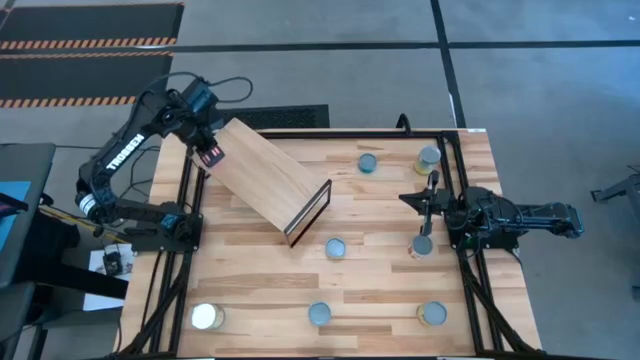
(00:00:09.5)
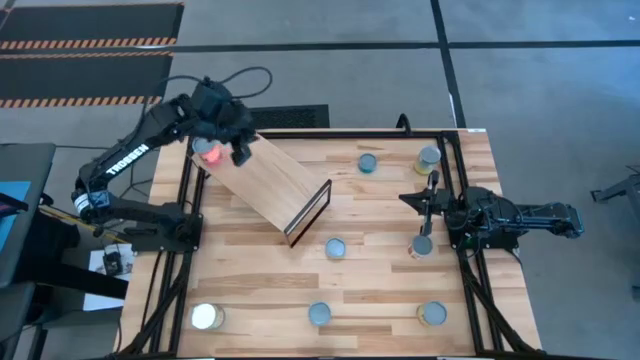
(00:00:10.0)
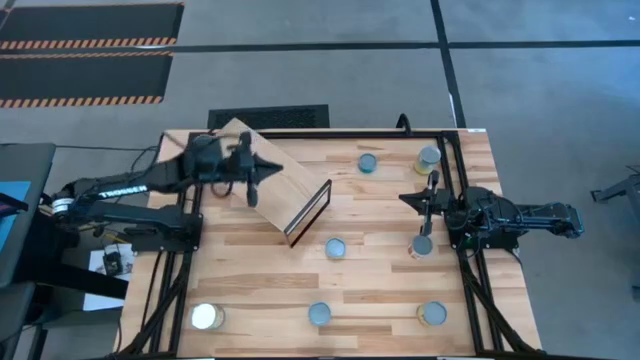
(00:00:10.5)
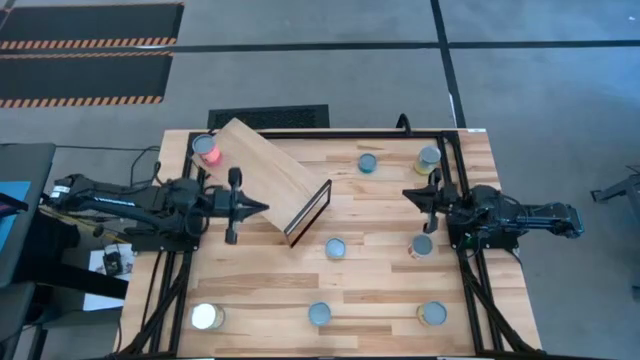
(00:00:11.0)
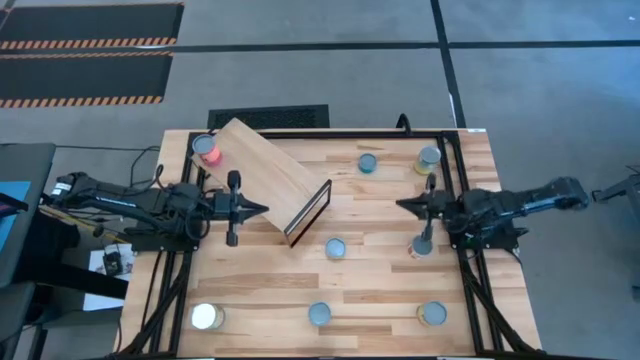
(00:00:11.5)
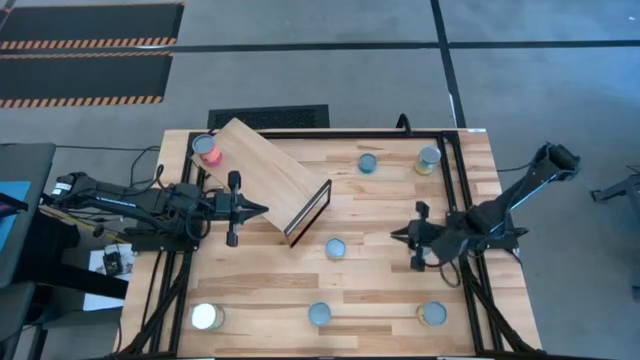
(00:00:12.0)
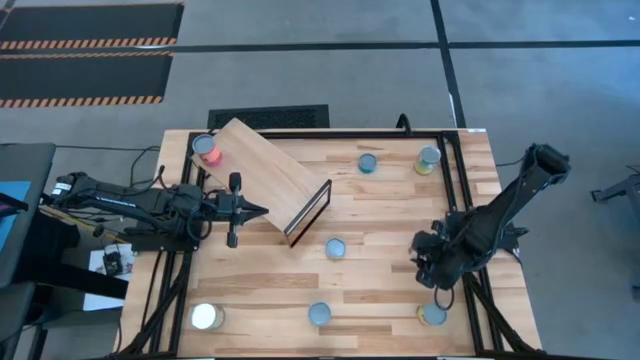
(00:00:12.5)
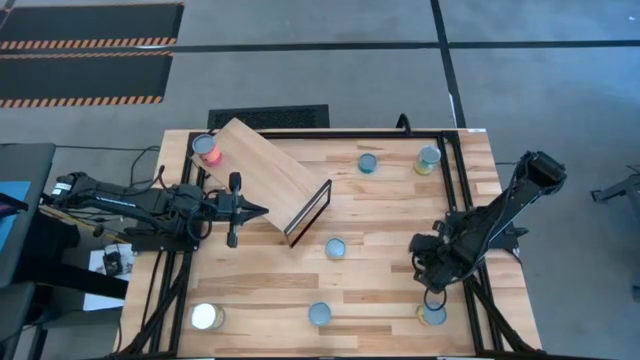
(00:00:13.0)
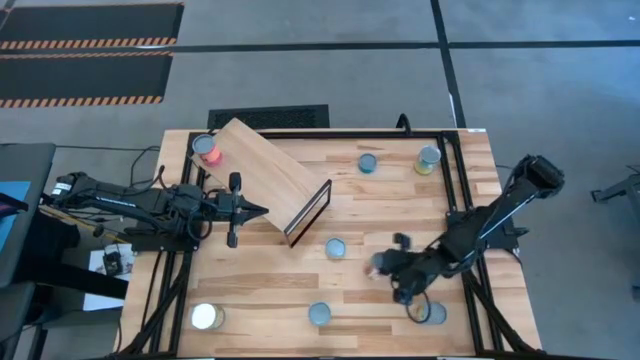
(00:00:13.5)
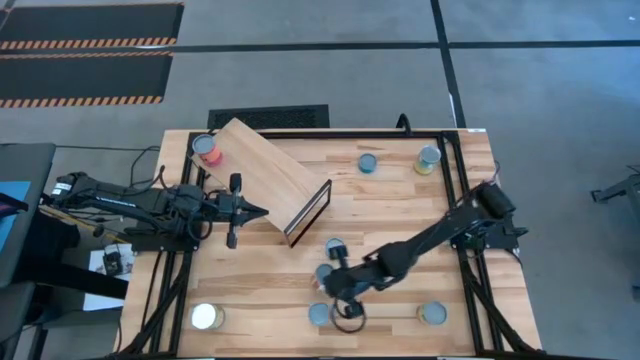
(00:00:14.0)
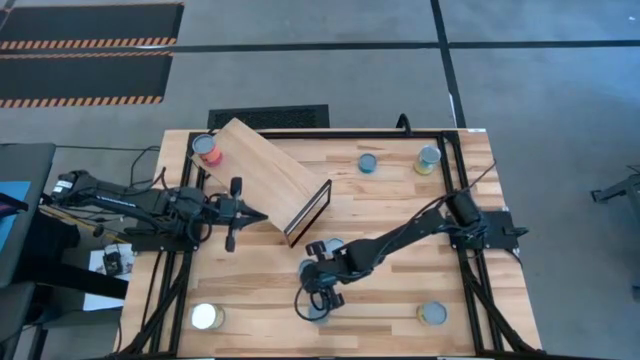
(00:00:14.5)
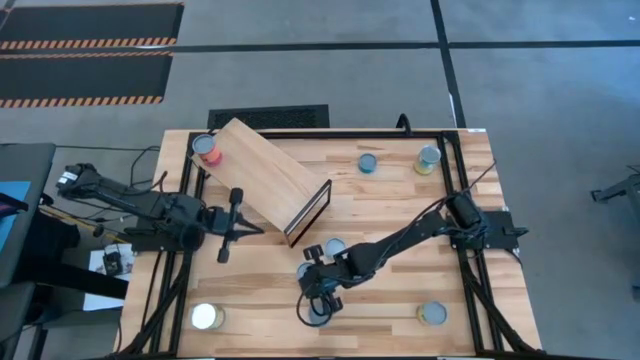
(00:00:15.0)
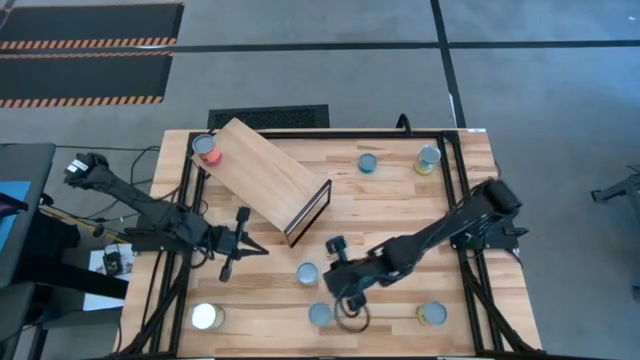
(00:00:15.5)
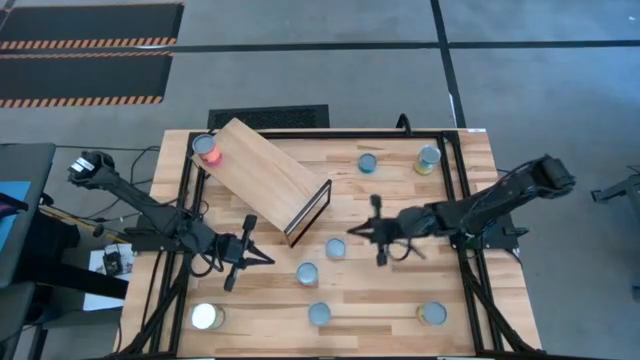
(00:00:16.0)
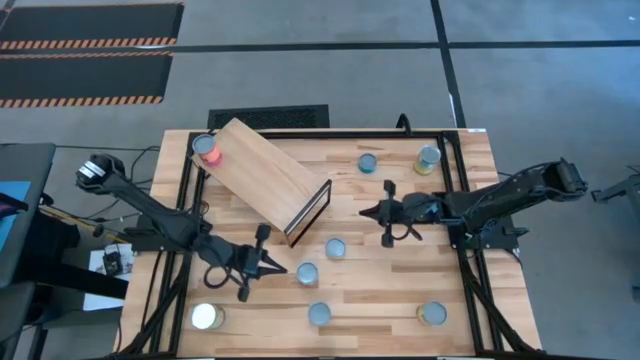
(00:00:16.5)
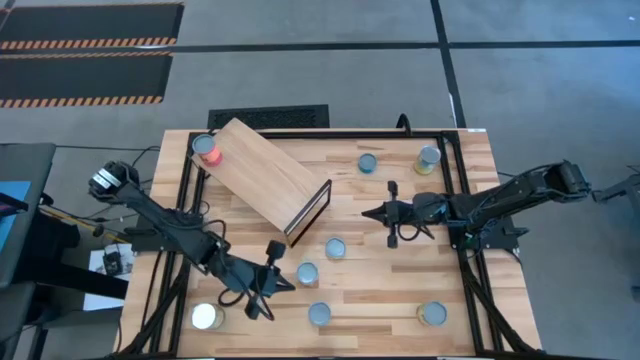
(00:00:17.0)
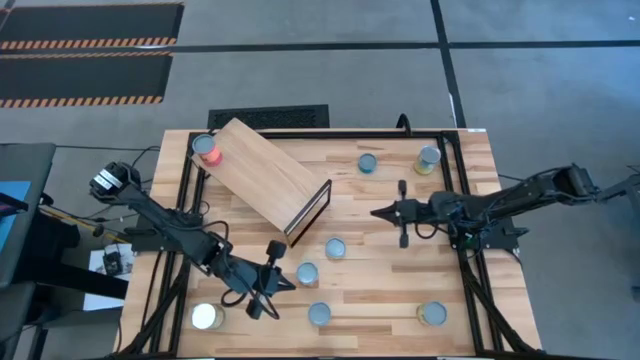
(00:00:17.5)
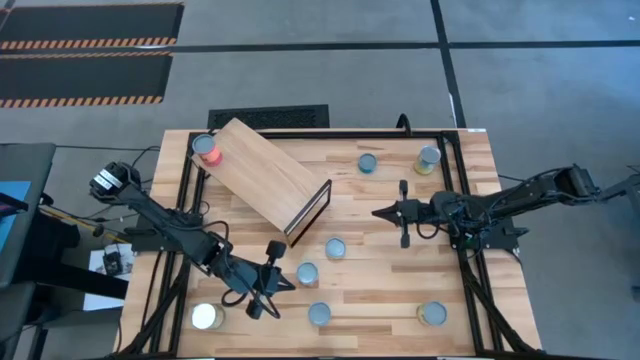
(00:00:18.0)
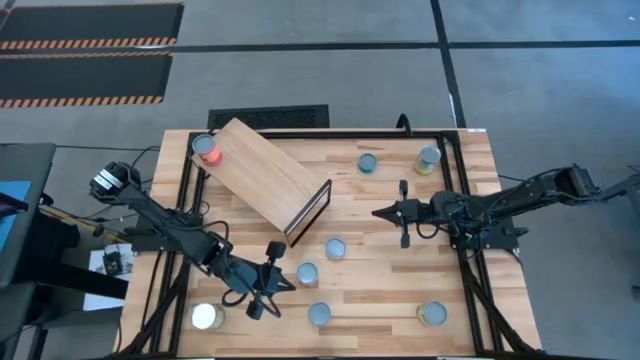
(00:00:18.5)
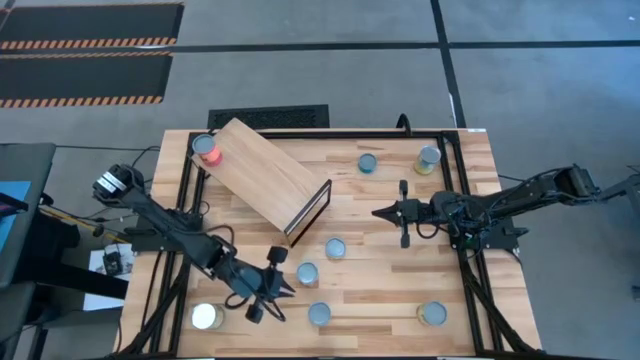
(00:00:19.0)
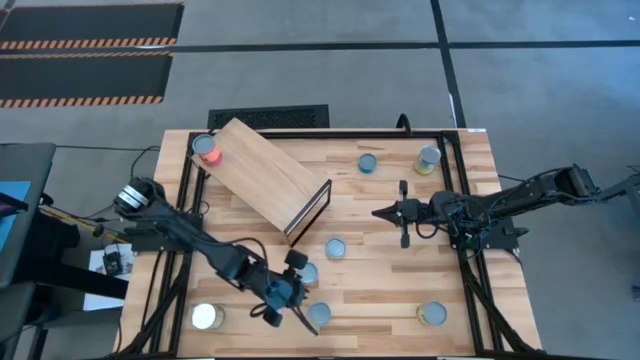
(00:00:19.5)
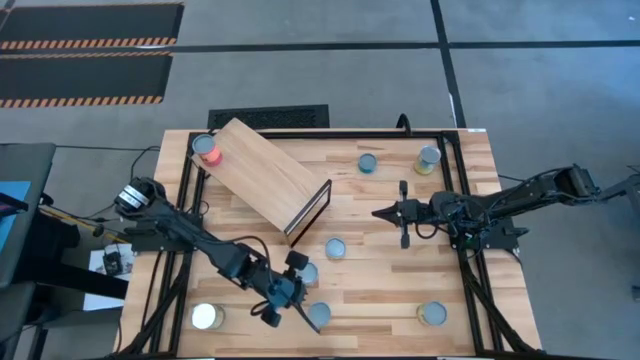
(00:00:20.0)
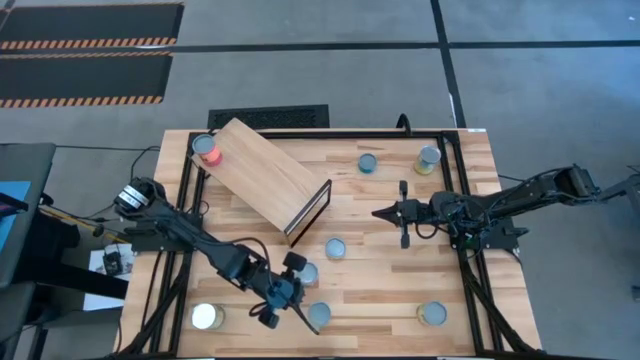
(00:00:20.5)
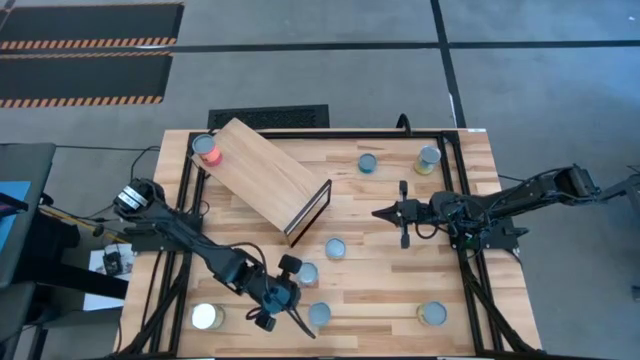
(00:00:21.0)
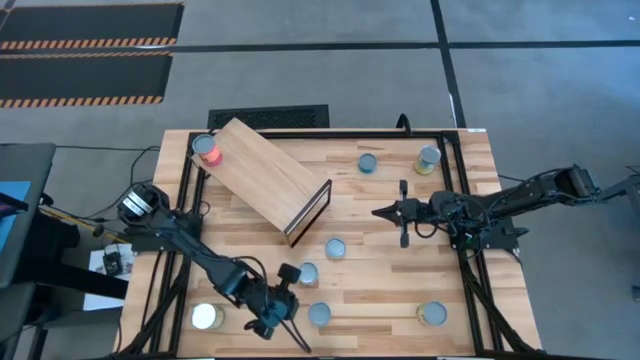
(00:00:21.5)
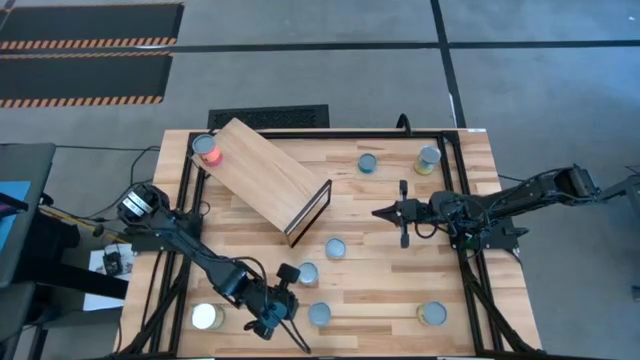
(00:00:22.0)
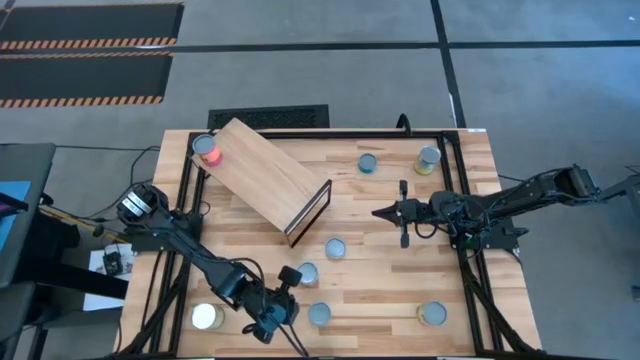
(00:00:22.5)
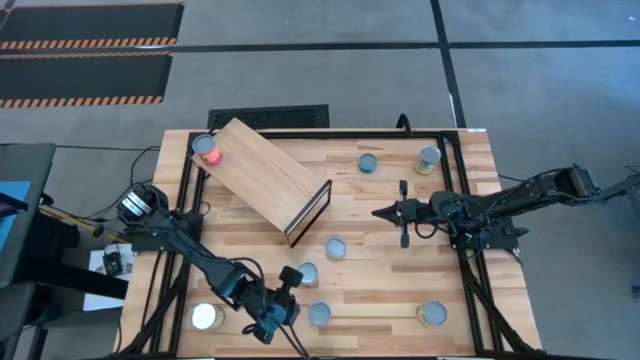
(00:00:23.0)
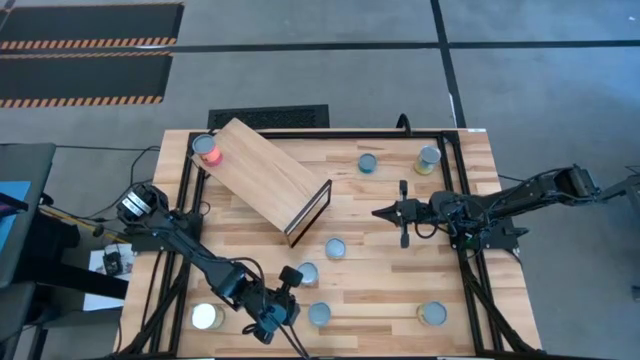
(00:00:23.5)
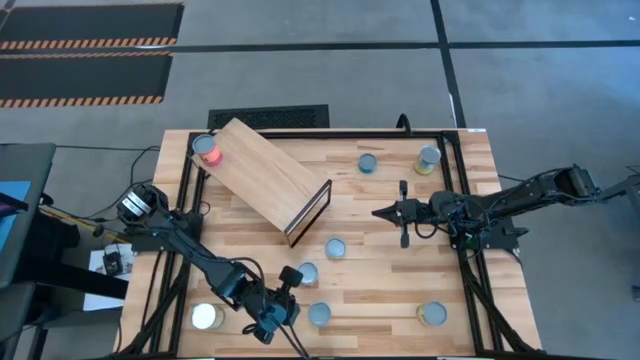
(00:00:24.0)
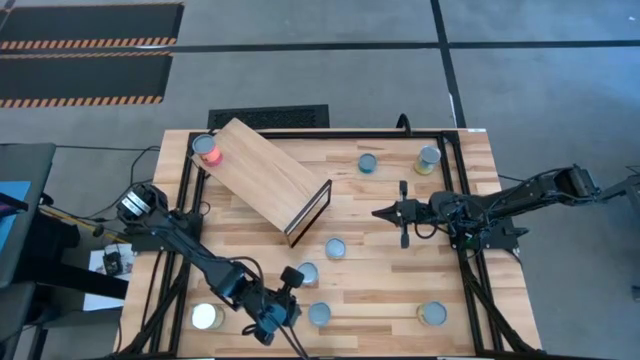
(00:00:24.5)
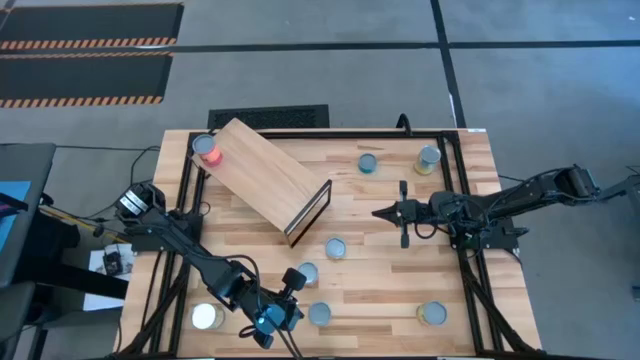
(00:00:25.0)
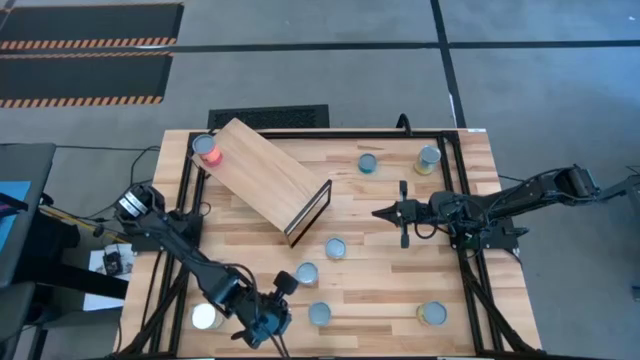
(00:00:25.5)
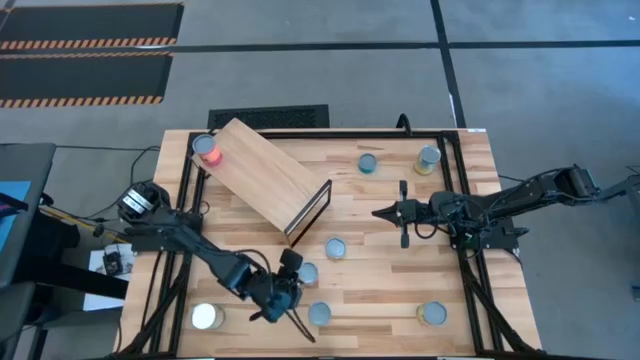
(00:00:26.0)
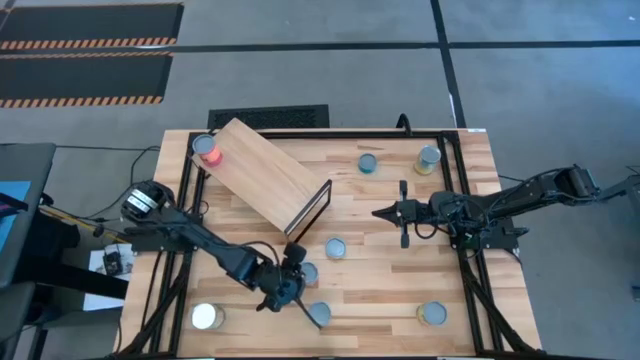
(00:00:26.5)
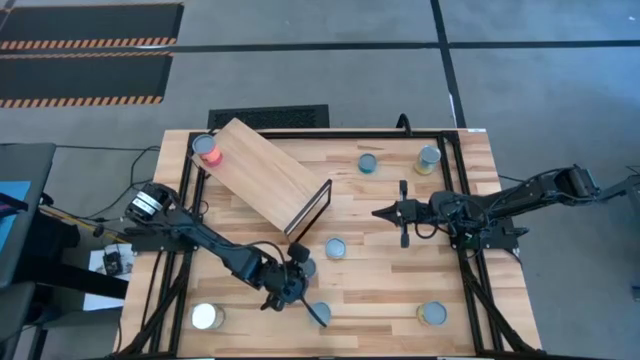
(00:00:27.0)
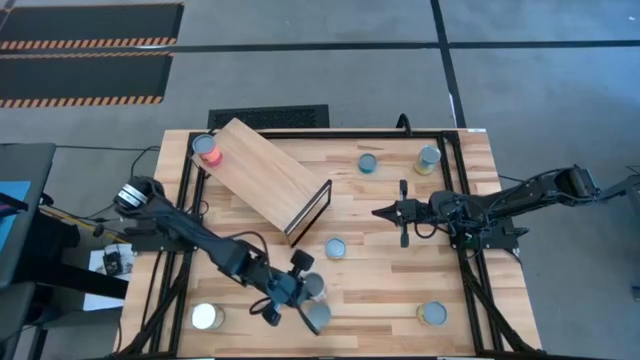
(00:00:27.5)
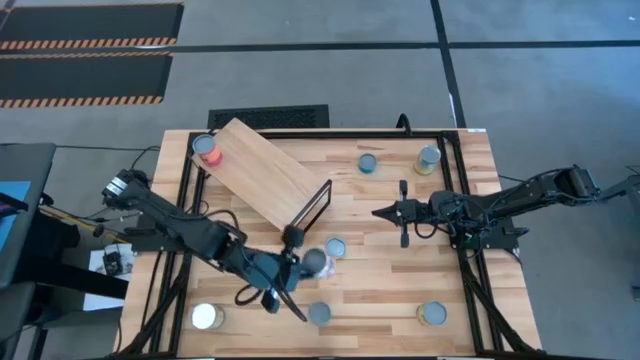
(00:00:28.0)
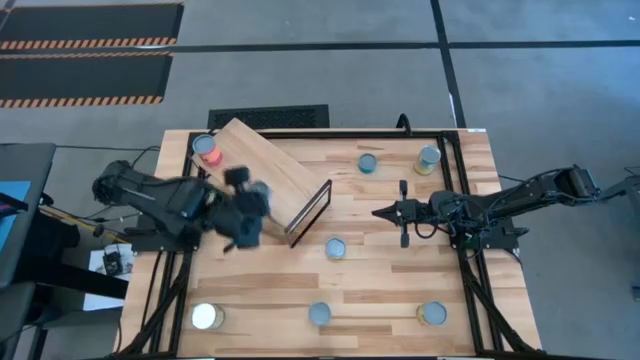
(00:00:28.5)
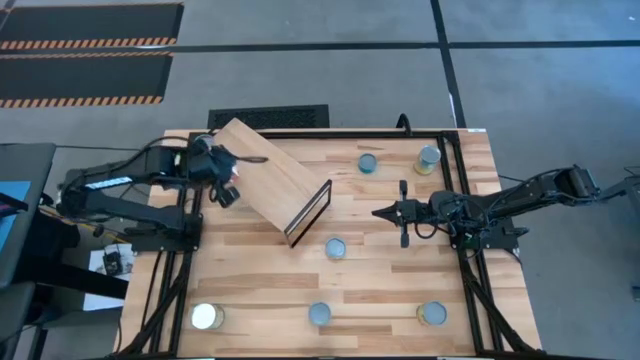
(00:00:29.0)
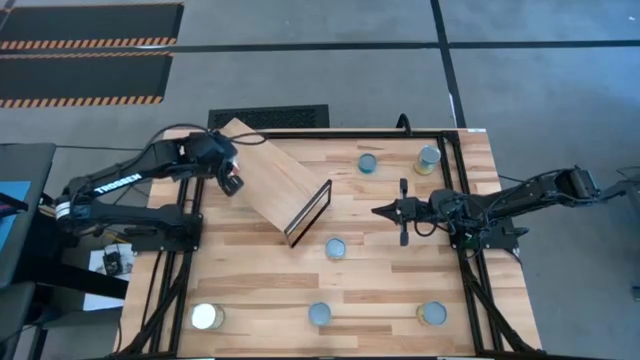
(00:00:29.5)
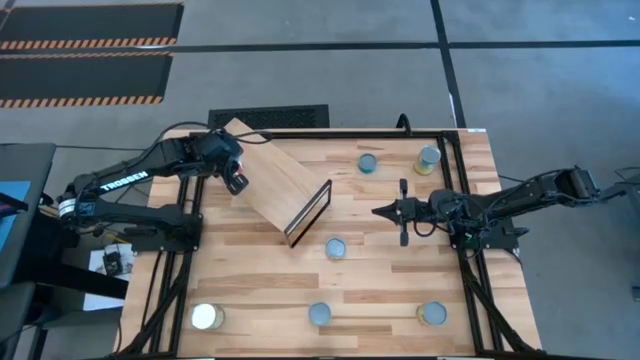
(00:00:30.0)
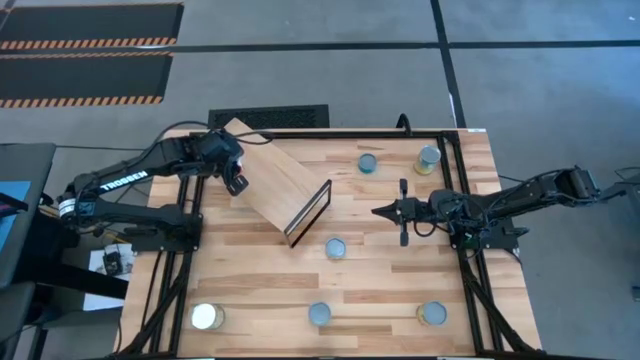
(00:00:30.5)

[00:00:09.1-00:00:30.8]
Task: Pick and place cans onto a shelf
Put the canned tomatoes on the shelf
